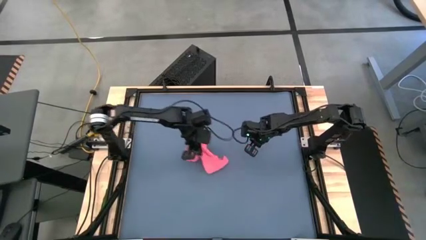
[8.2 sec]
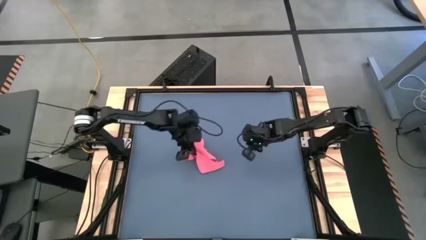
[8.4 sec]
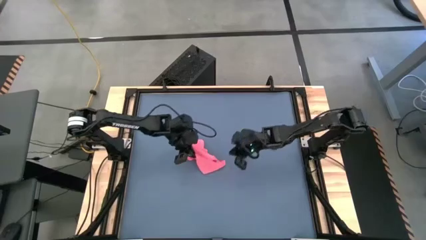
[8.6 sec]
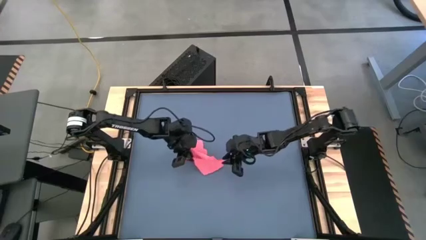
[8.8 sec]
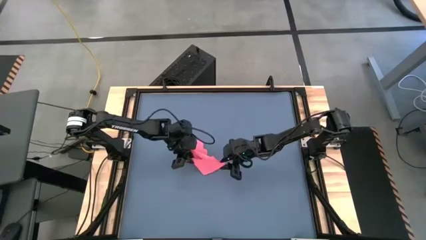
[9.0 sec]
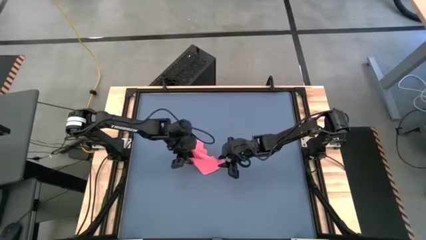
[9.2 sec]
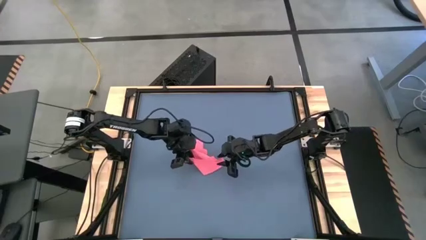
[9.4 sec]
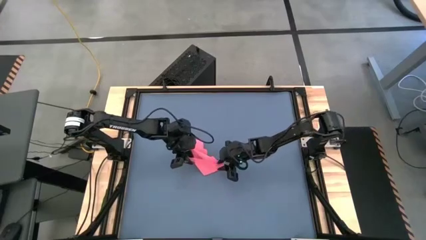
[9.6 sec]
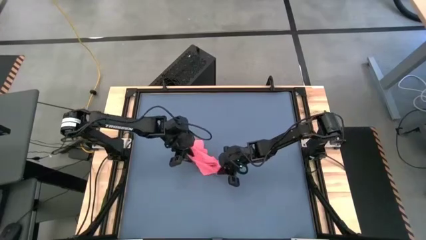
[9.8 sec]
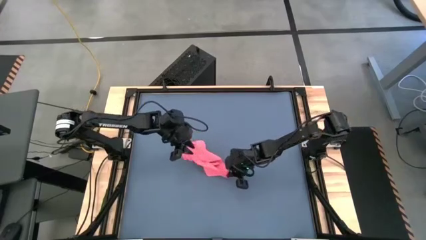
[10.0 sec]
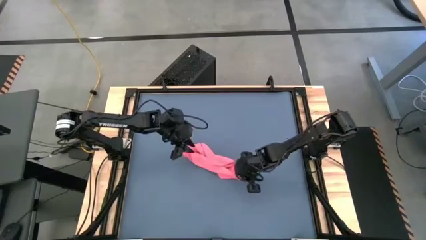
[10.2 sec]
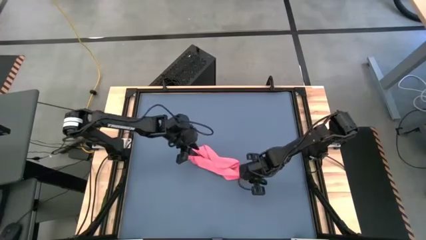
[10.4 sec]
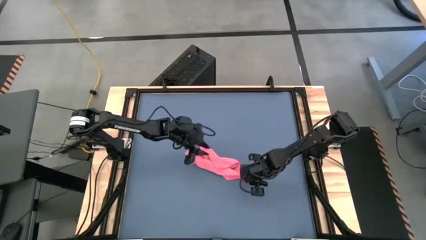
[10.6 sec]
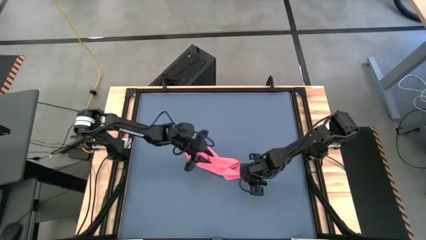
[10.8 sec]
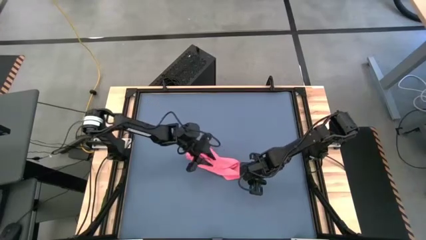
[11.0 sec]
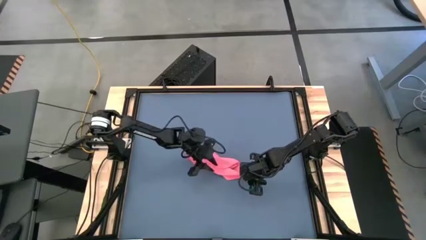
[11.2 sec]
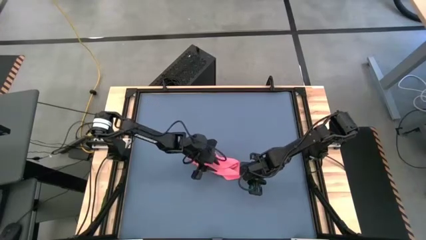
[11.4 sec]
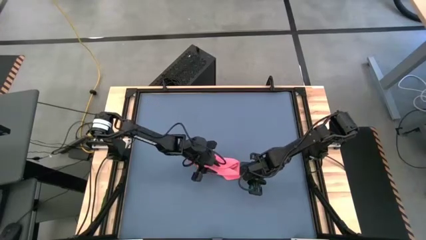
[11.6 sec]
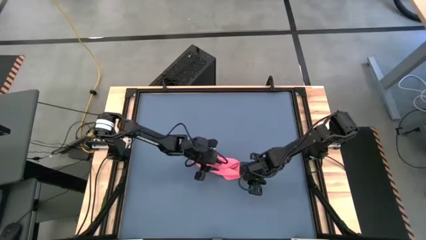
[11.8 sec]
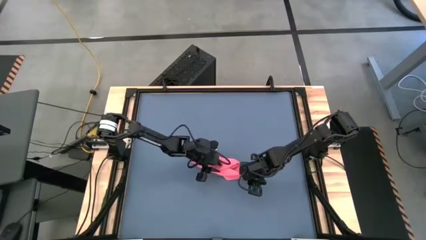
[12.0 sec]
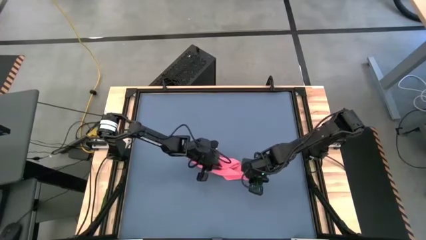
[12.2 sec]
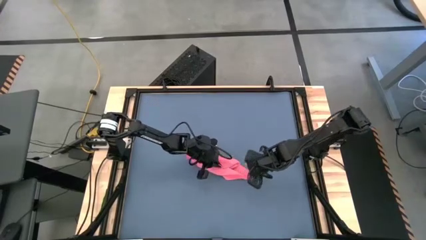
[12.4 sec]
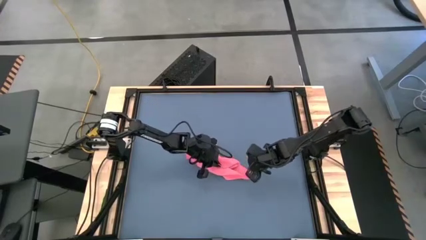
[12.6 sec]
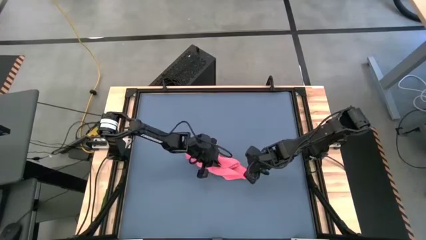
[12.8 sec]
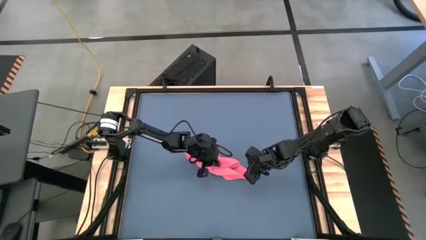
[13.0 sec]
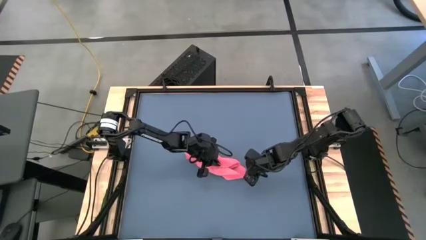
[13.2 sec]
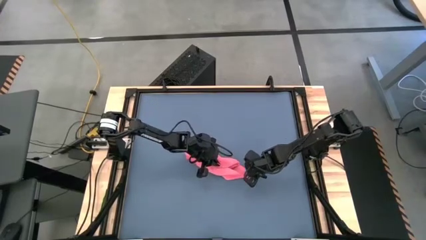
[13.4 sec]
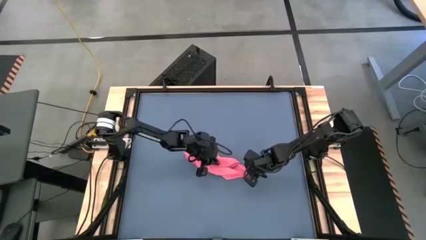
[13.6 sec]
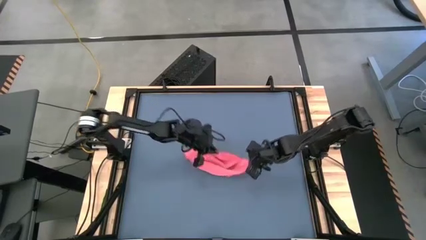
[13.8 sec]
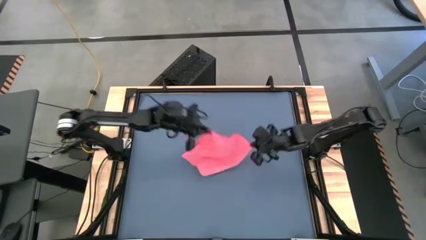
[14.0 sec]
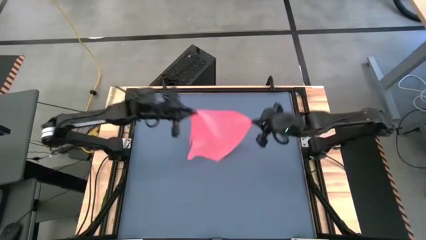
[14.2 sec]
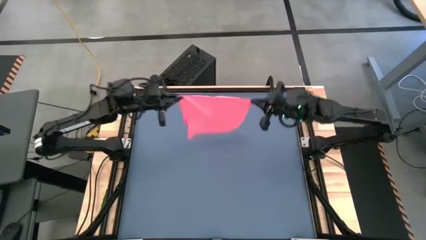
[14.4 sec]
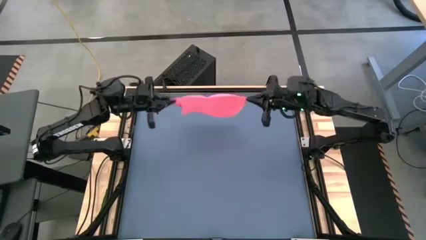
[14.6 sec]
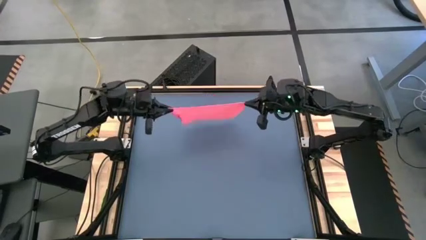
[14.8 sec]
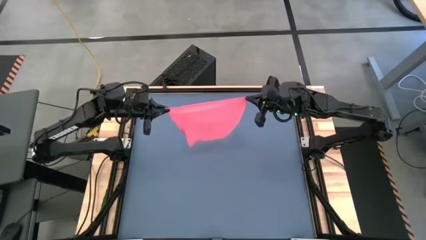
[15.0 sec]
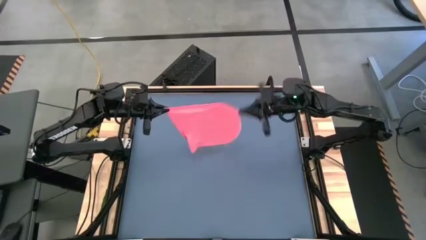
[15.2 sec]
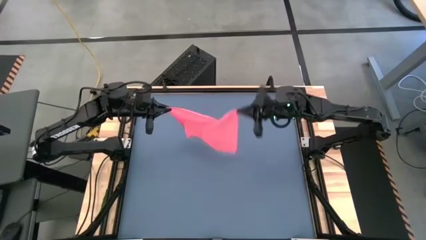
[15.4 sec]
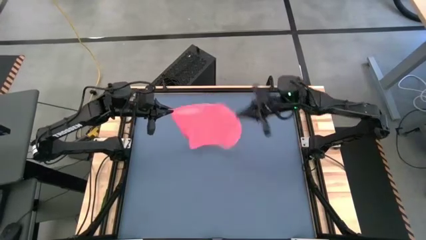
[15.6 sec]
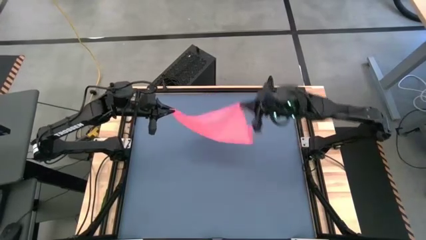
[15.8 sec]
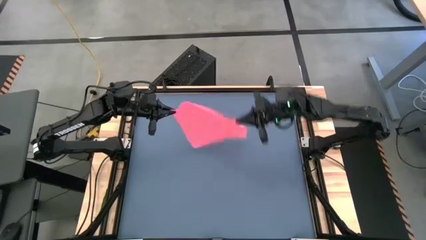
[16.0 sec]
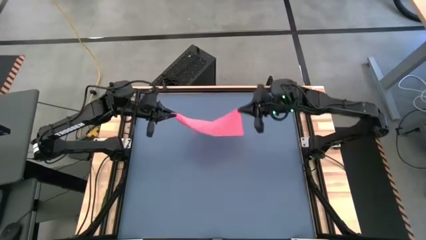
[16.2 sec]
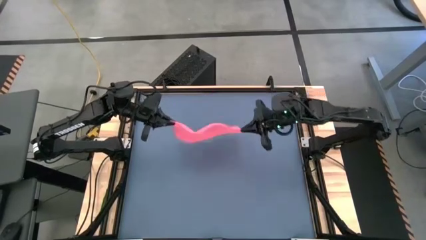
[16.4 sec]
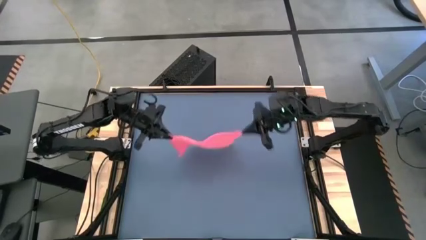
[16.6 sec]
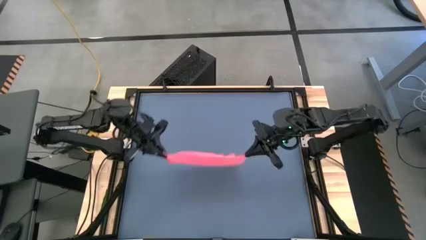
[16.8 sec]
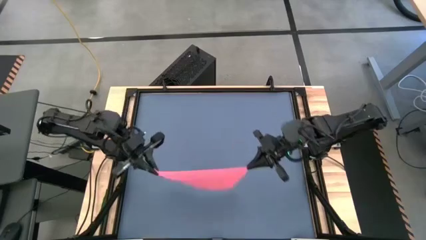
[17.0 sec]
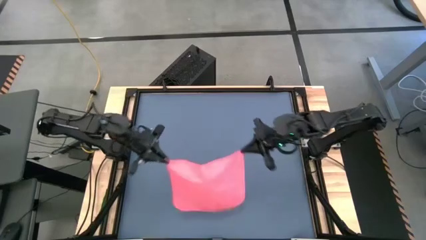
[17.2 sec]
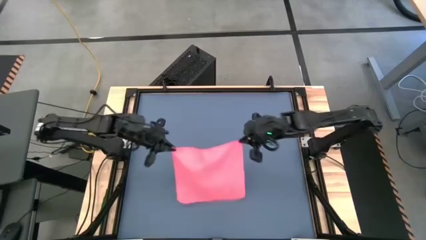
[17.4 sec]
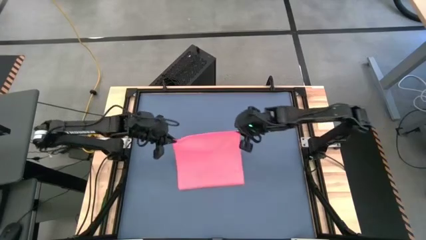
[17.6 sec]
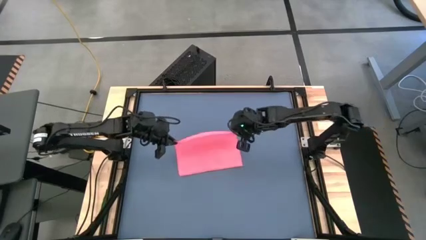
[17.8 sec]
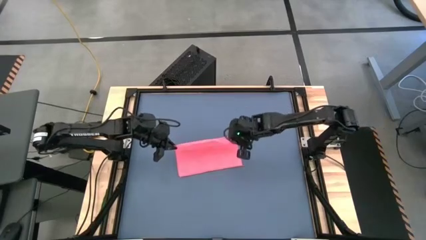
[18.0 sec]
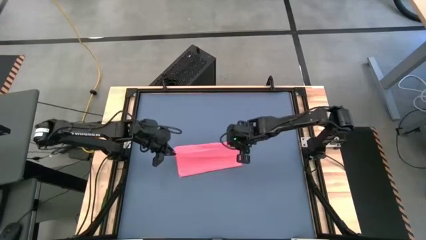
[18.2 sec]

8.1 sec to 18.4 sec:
Task: Roll towel
Fold the pink towel
